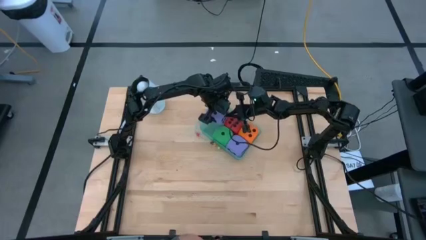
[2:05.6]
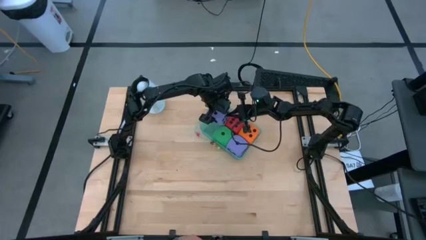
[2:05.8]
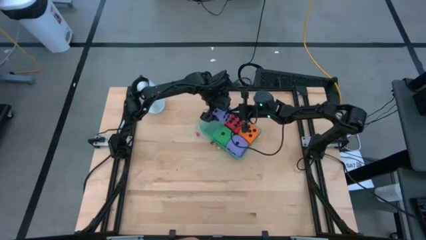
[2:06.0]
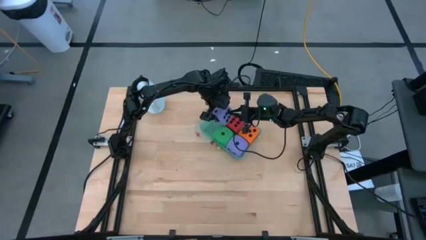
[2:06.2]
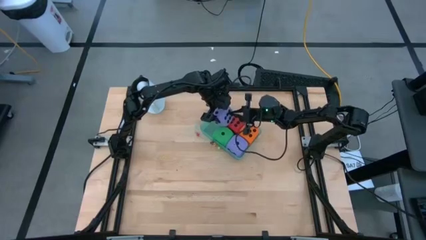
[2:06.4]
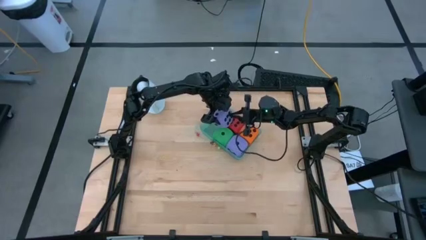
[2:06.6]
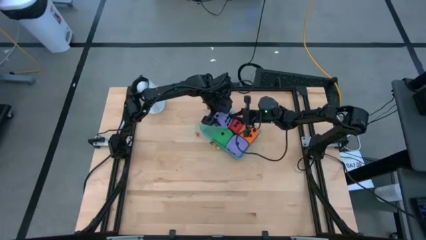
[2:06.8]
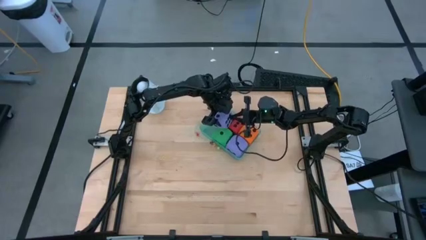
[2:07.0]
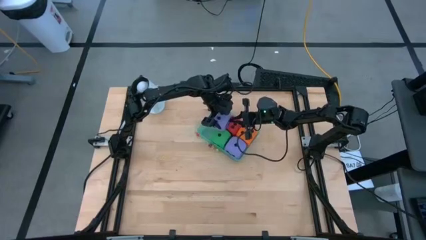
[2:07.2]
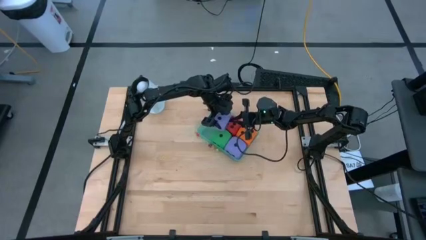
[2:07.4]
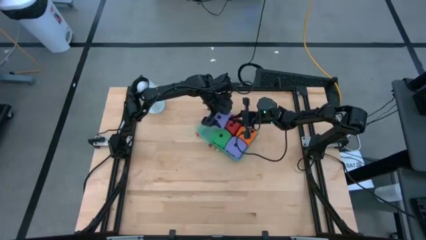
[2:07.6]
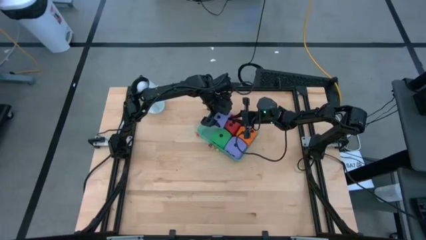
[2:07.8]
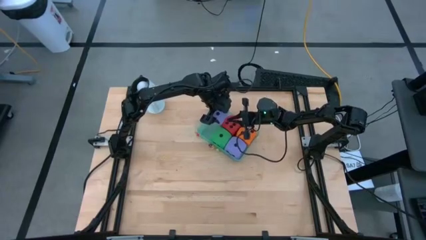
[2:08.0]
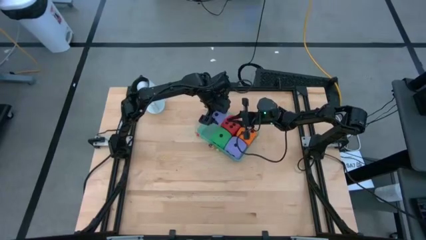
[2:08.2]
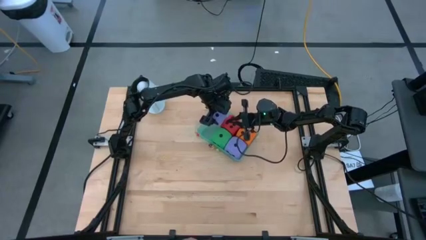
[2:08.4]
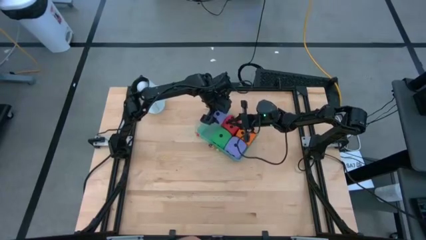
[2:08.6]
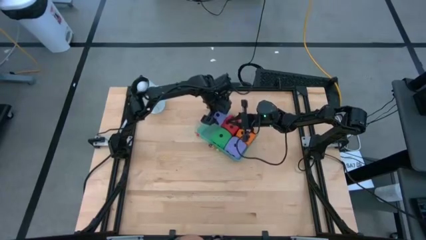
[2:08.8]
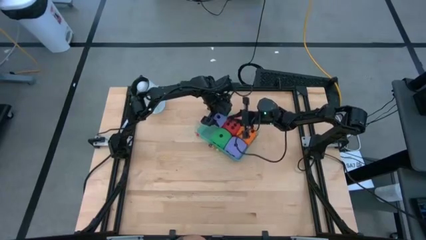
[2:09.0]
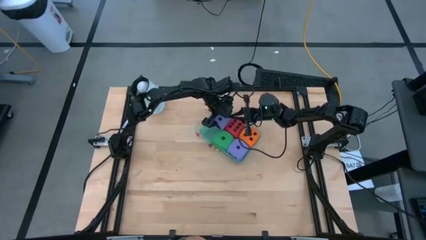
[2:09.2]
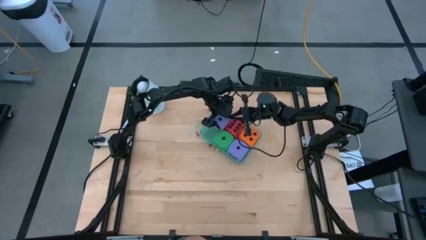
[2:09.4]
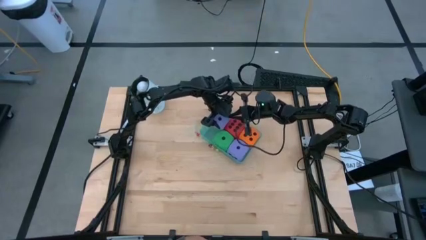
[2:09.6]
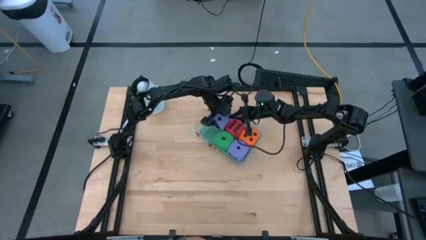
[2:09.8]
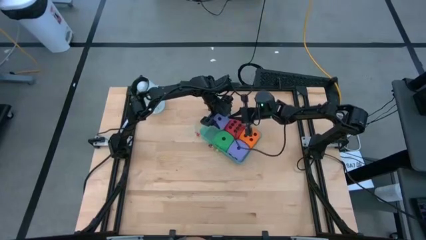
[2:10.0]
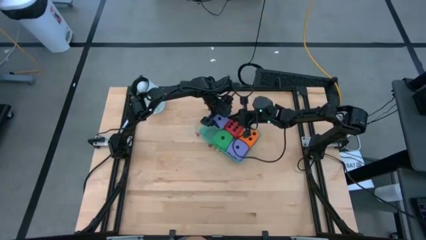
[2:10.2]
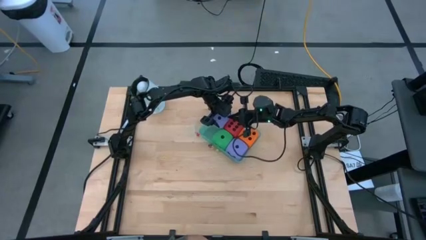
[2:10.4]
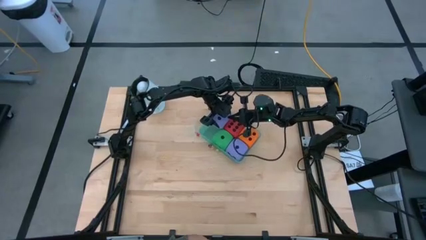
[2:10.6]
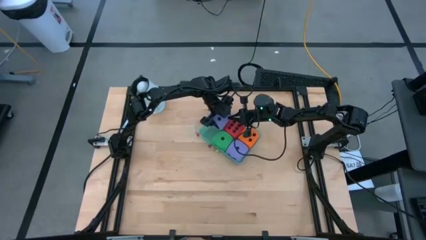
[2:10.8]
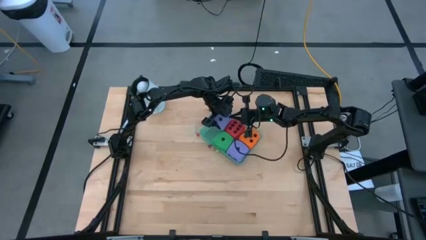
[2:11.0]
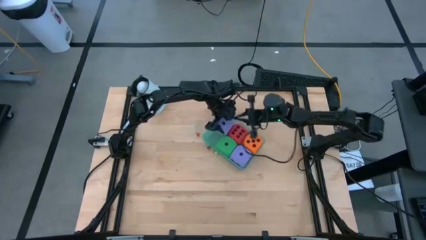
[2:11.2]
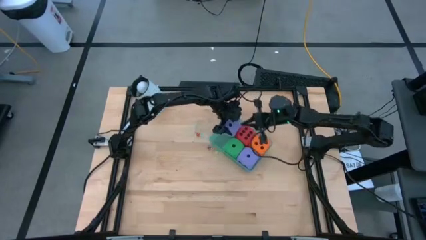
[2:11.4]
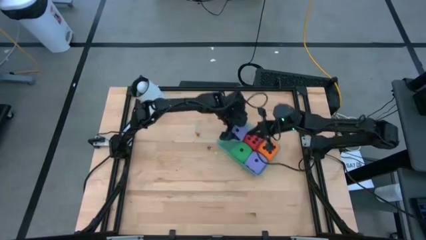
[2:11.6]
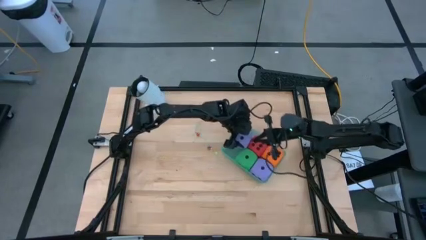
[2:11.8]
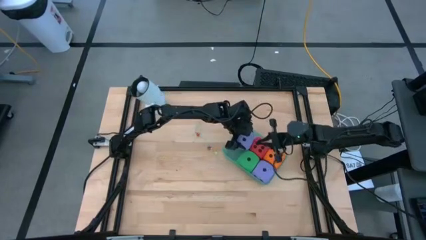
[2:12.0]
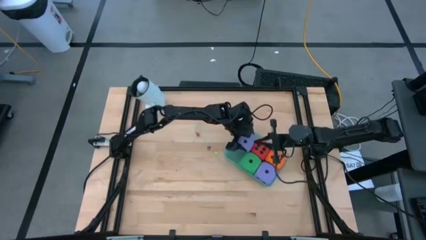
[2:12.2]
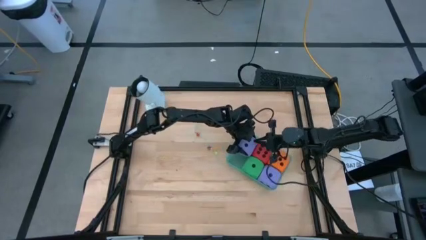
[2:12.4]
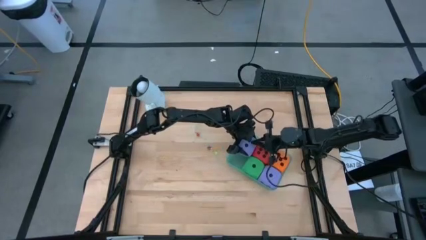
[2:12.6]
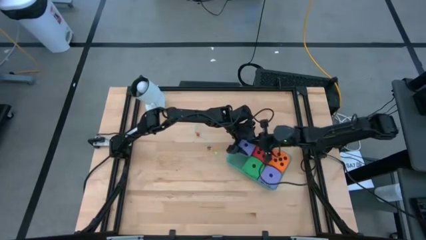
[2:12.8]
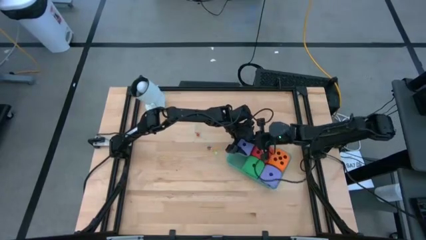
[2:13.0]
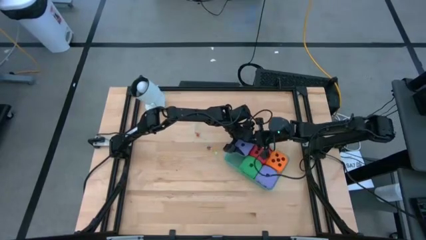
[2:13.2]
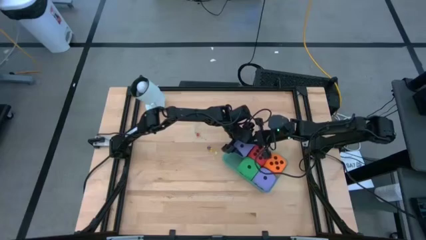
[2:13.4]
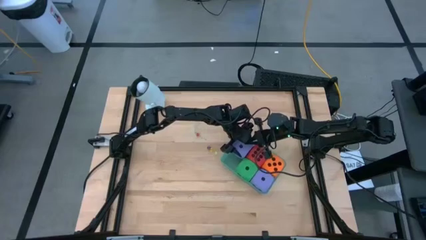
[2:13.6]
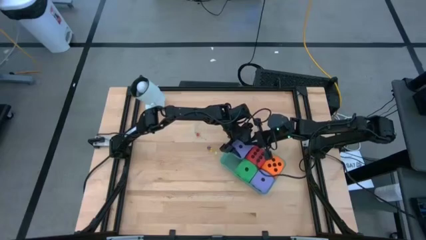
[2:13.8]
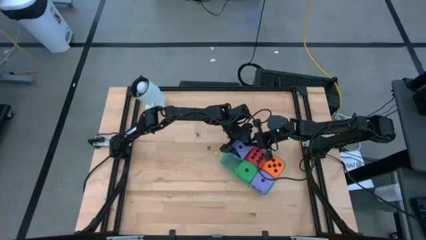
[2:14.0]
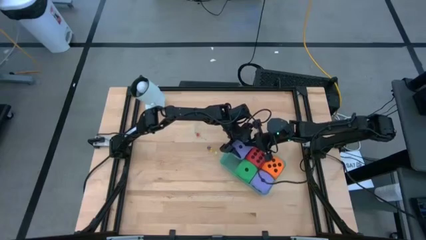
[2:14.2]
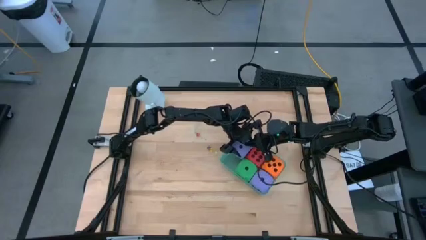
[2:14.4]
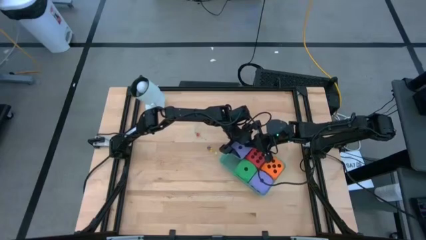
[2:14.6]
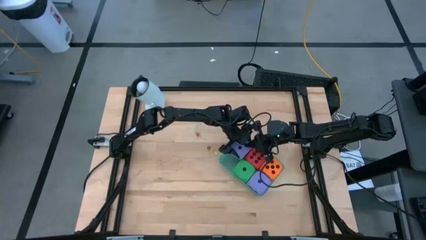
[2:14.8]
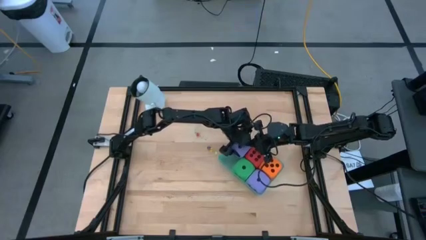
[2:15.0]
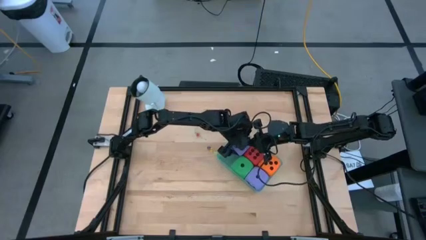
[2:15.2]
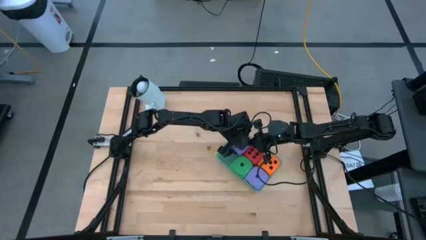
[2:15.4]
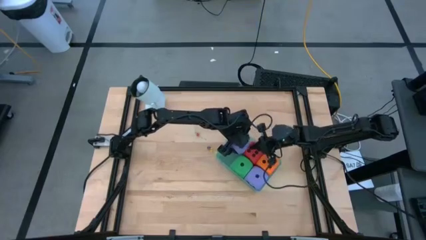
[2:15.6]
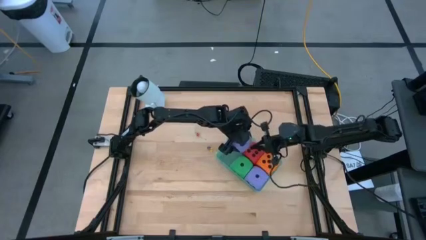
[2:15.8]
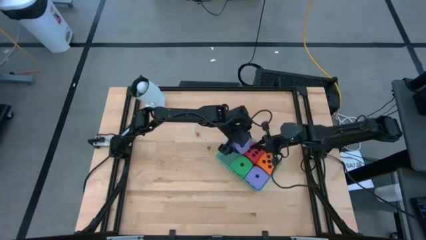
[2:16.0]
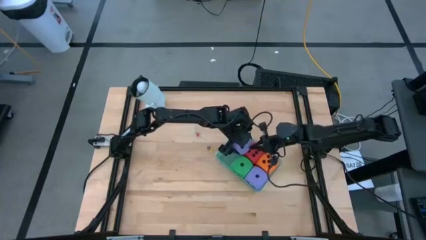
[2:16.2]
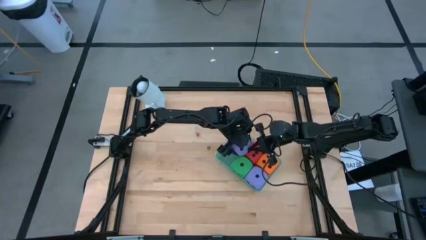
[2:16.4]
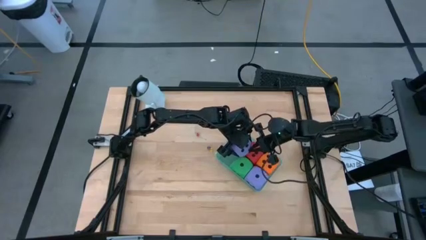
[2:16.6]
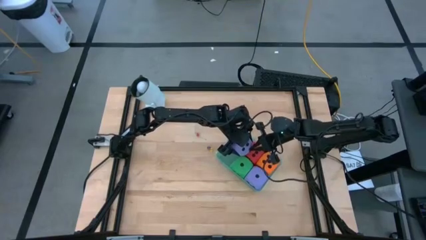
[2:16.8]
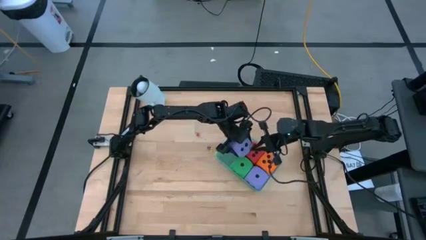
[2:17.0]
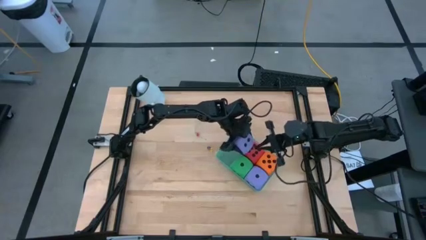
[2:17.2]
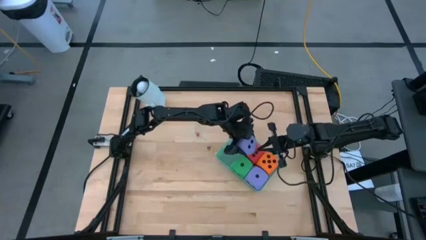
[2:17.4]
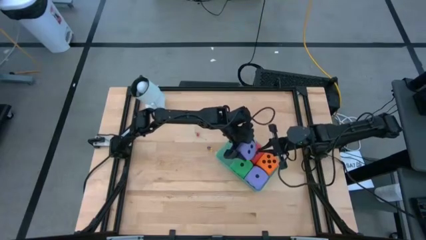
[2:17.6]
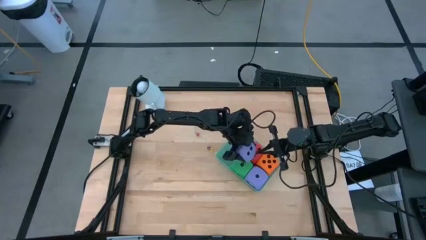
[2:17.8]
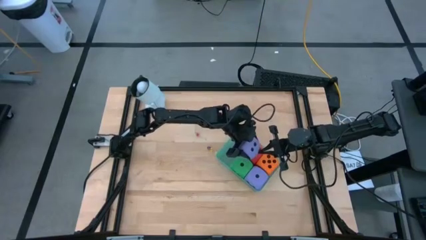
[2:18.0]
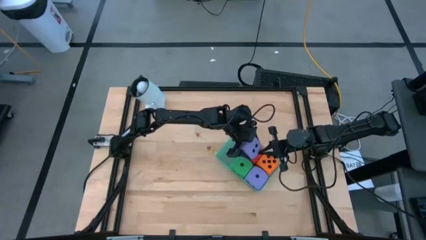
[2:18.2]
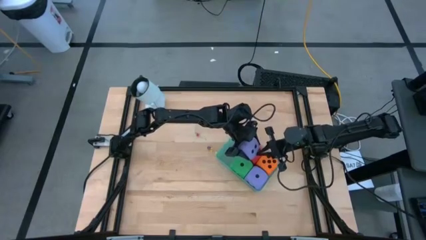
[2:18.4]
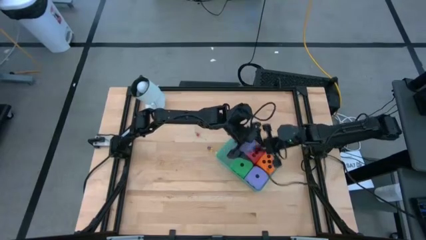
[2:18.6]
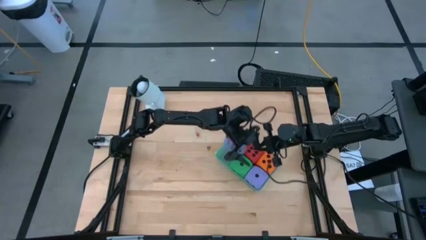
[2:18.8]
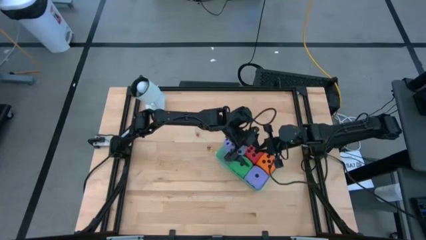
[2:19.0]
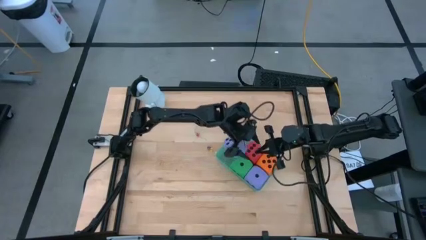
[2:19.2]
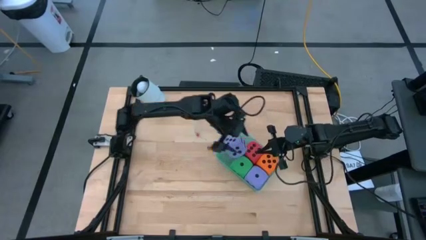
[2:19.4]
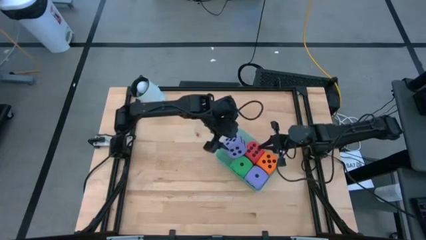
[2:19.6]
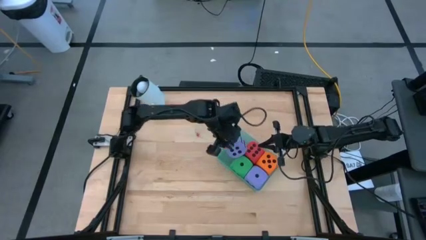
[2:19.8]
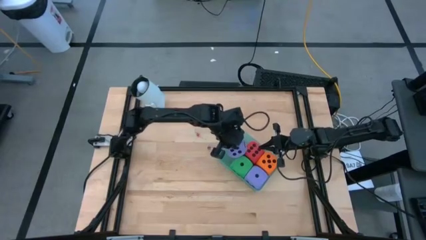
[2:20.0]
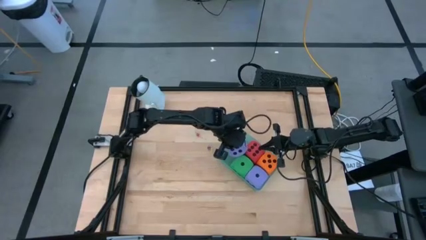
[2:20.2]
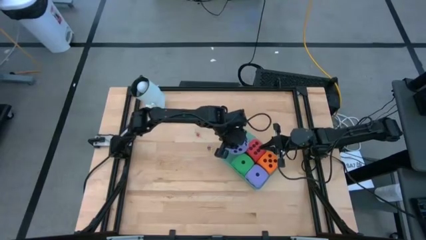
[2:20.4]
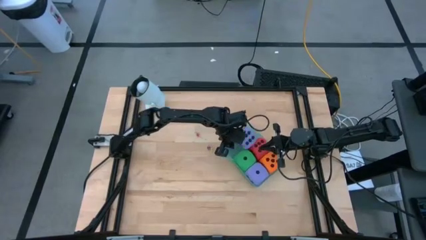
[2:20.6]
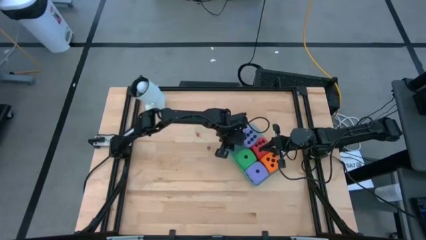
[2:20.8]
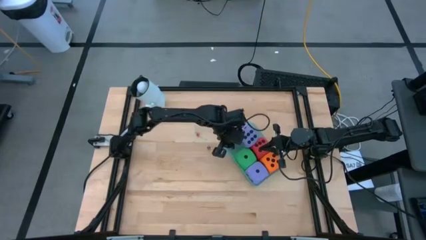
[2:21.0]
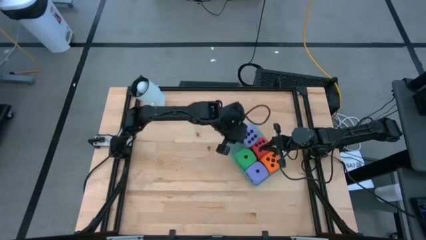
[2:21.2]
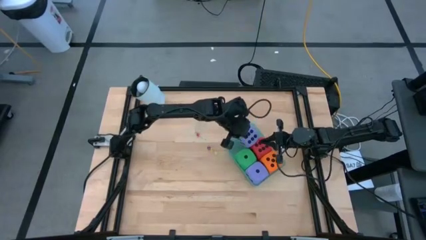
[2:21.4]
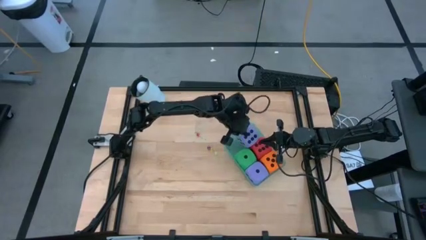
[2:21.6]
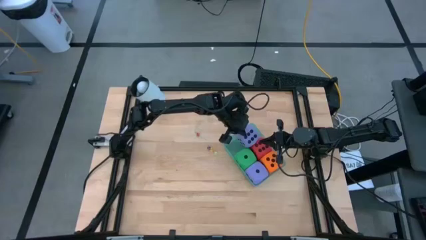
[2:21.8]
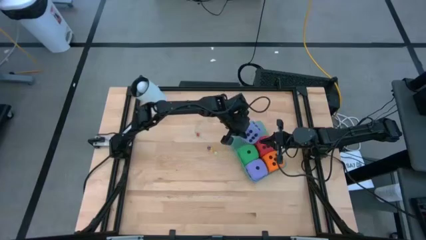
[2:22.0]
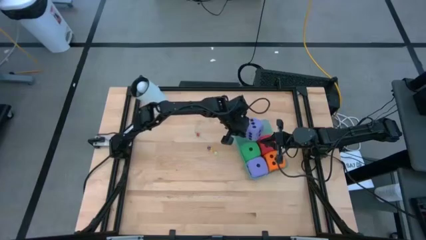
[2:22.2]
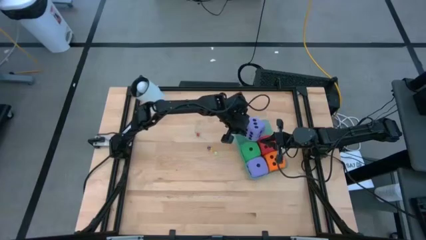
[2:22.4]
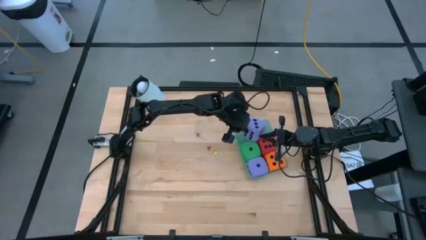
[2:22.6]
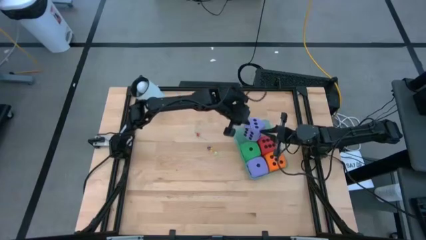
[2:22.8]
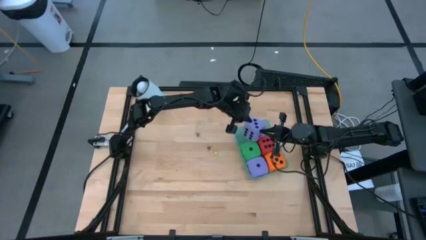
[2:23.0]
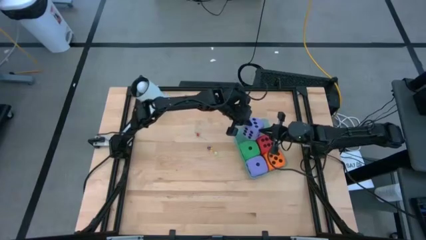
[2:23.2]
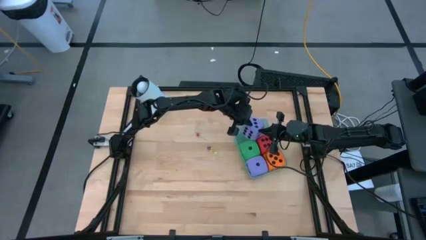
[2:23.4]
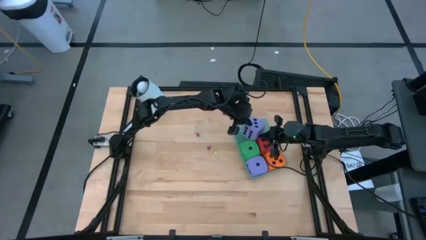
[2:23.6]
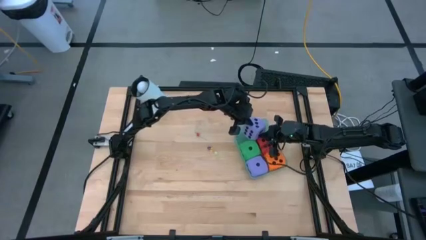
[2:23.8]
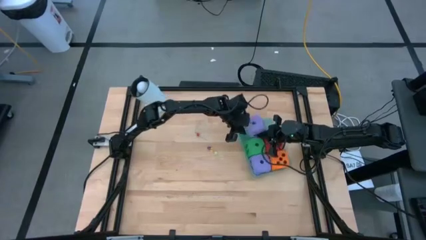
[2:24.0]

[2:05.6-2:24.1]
Task: Pick & Place Dice
Put the big purple dice into the bin
